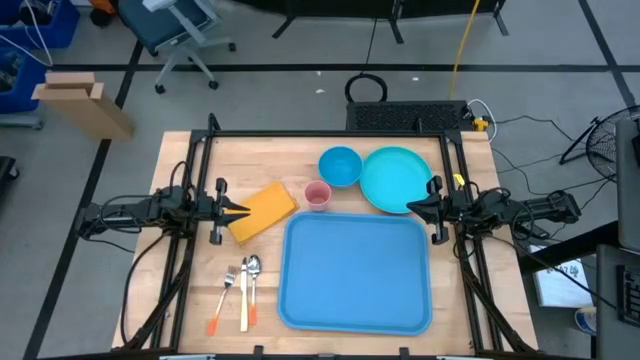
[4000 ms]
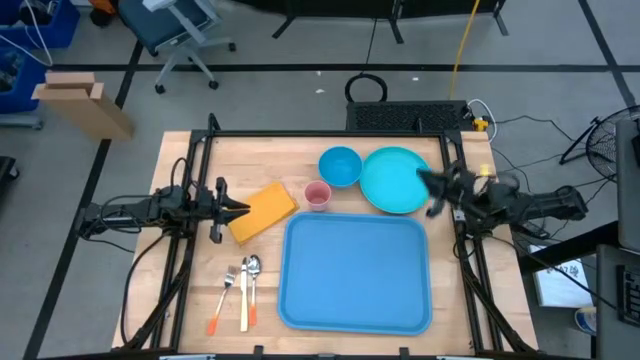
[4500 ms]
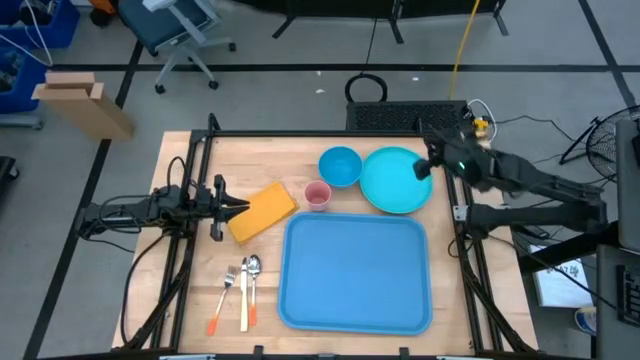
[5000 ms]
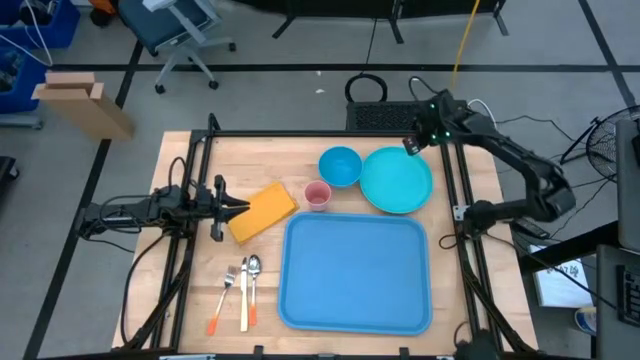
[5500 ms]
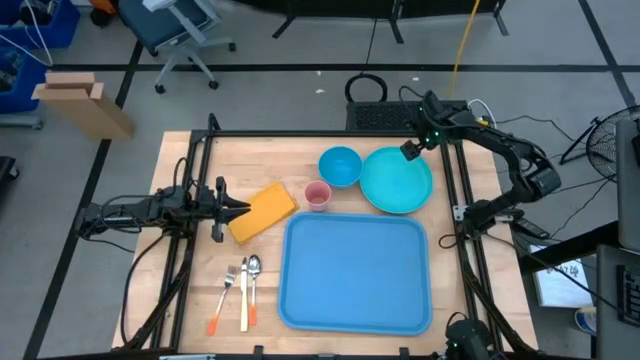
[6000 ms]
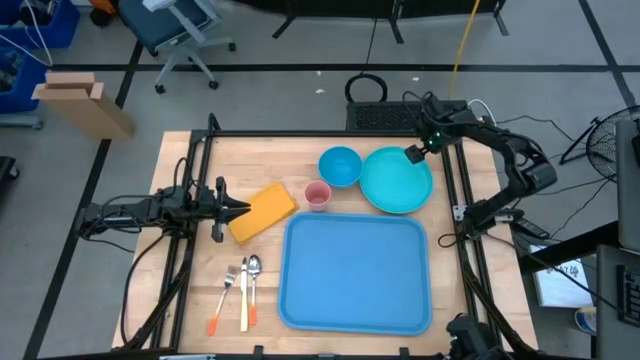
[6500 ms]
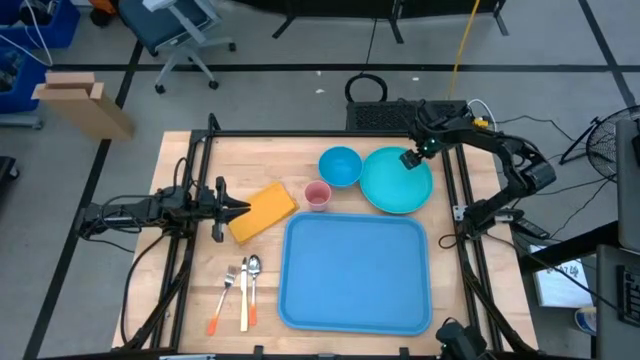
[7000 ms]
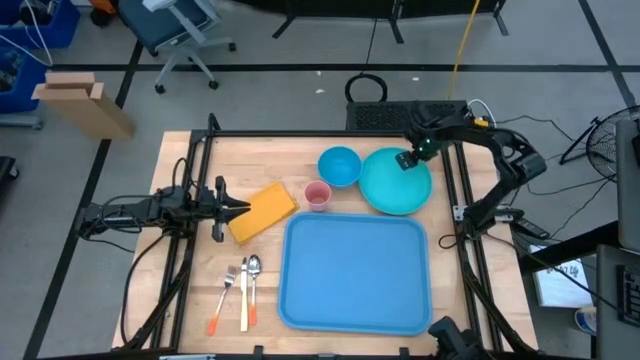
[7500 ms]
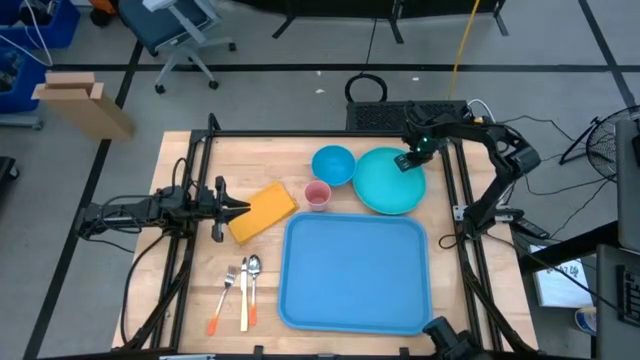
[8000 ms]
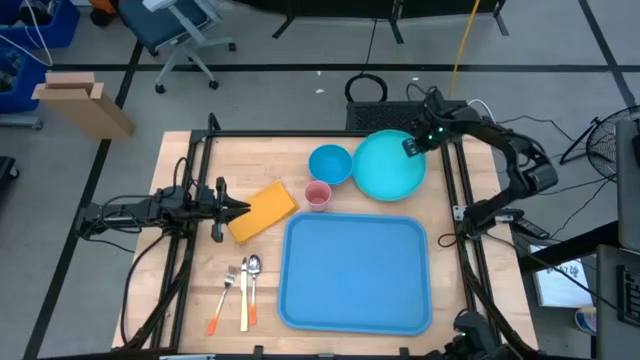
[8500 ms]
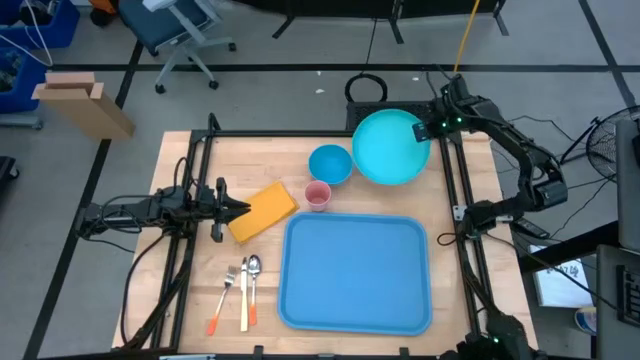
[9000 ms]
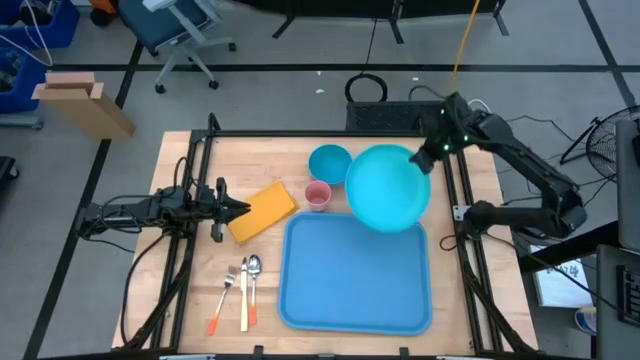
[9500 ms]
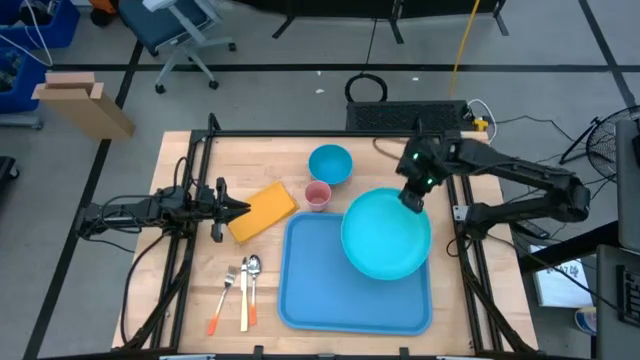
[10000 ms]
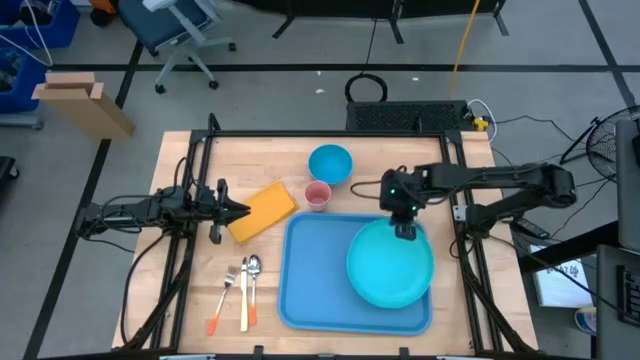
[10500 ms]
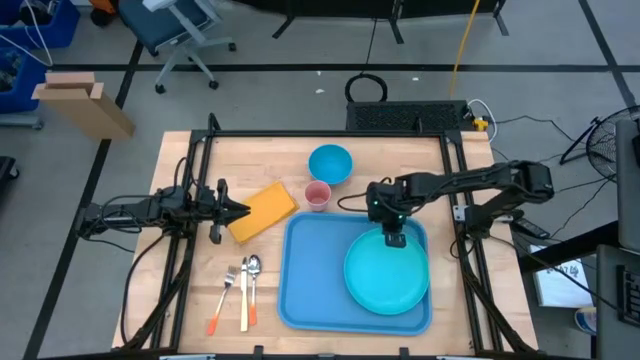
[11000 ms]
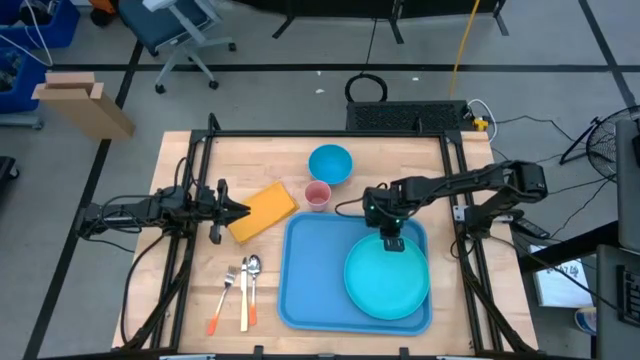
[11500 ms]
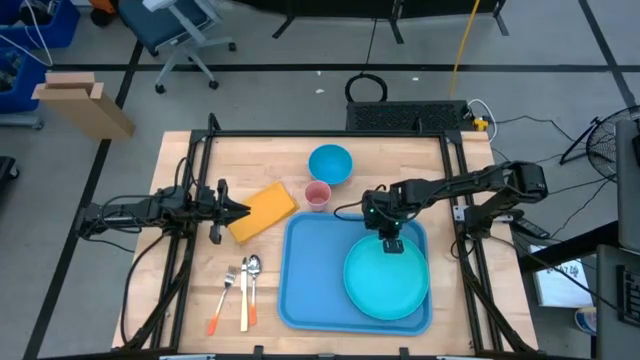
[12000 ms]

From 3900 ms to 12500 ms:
Task: Set up tray
Put the blue plate on right side of the blue serving tray

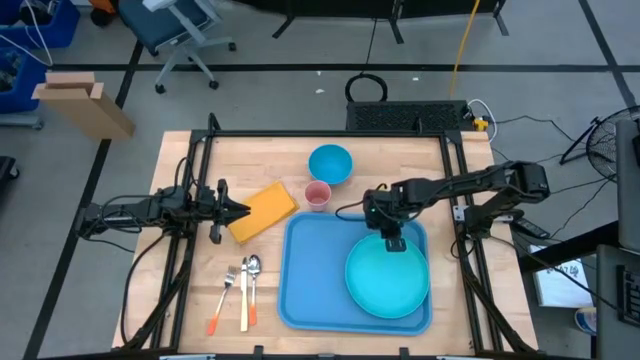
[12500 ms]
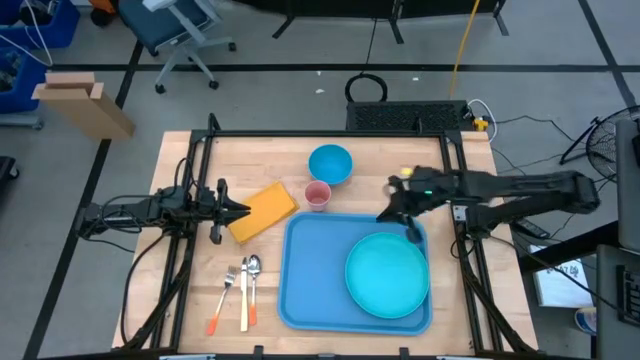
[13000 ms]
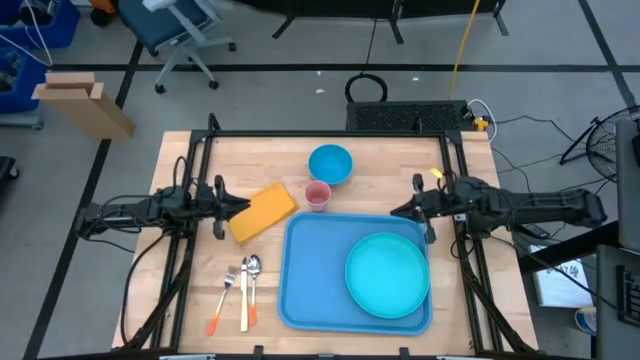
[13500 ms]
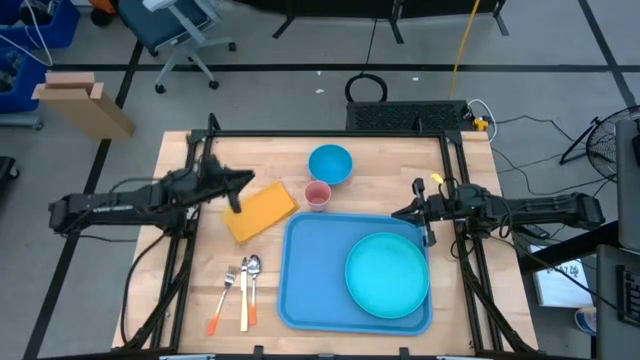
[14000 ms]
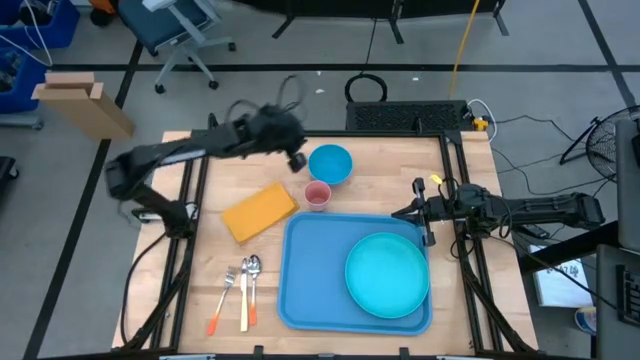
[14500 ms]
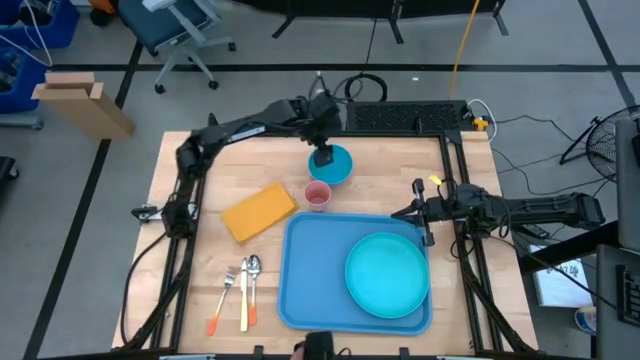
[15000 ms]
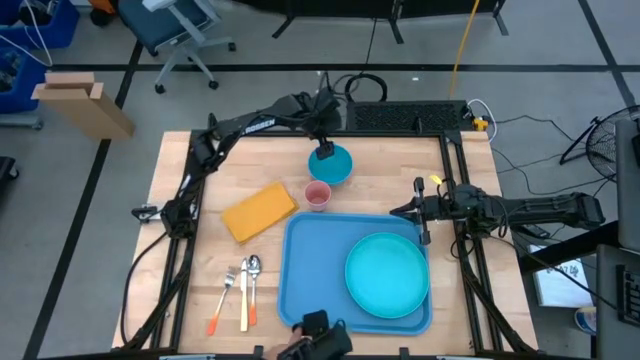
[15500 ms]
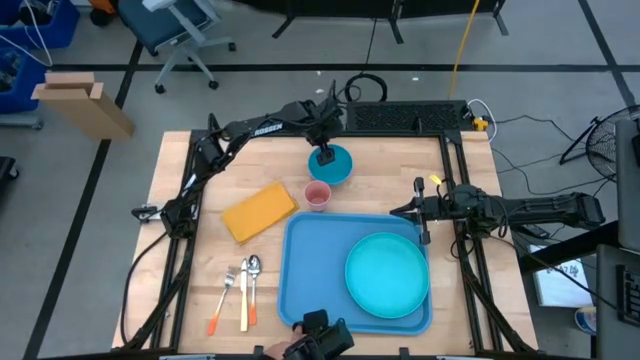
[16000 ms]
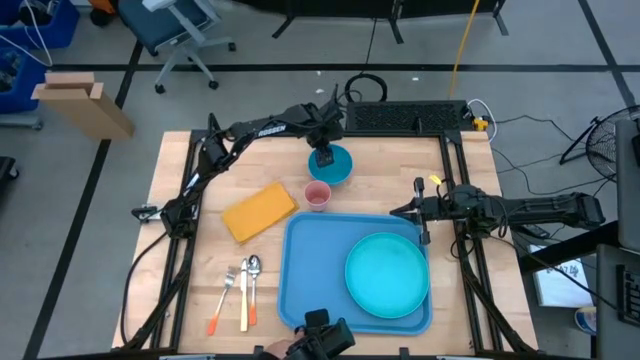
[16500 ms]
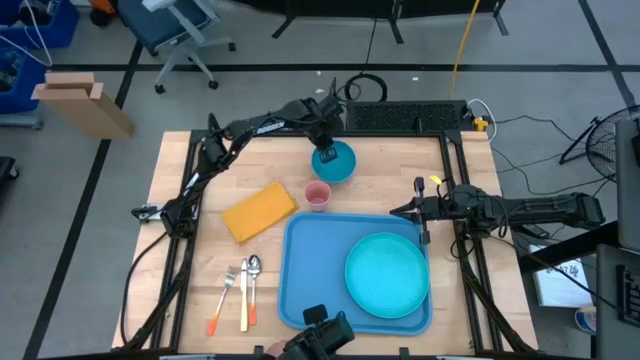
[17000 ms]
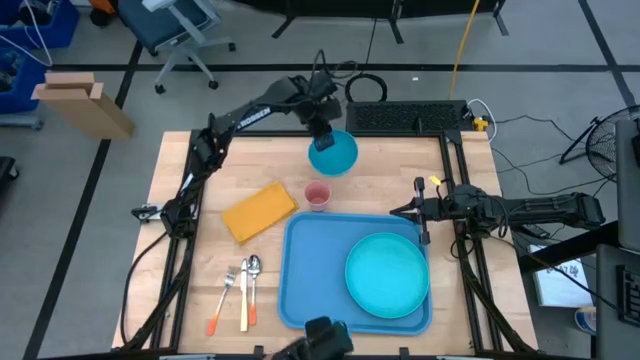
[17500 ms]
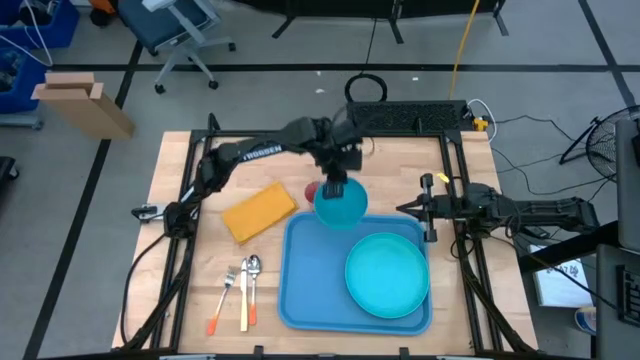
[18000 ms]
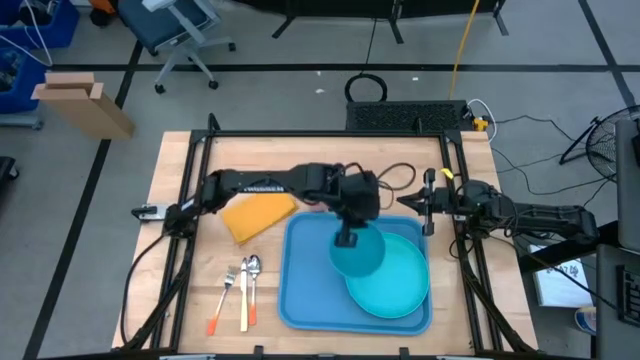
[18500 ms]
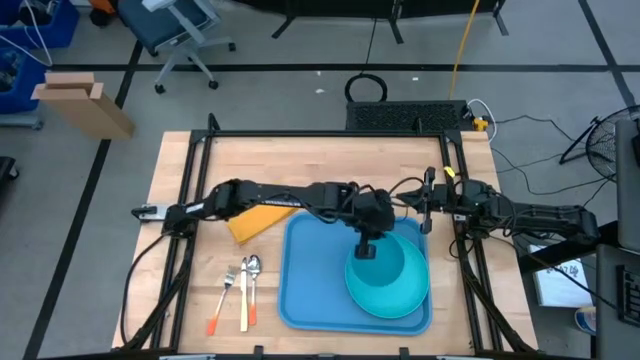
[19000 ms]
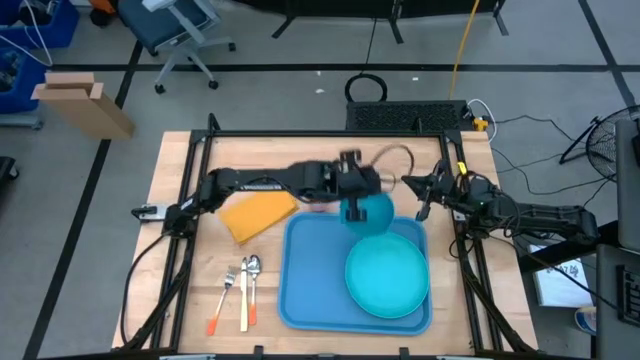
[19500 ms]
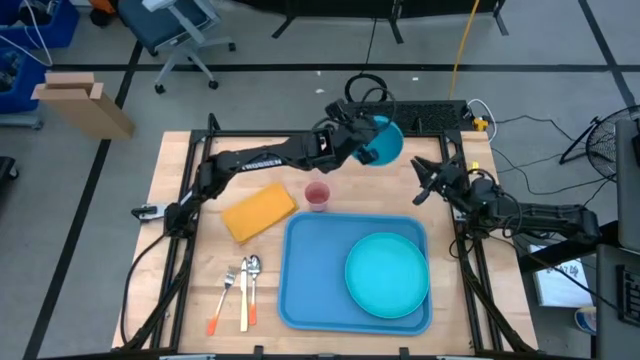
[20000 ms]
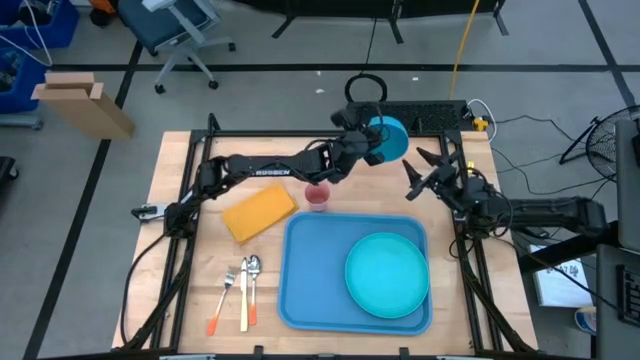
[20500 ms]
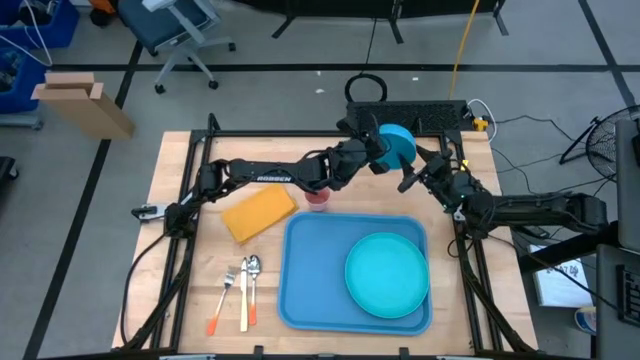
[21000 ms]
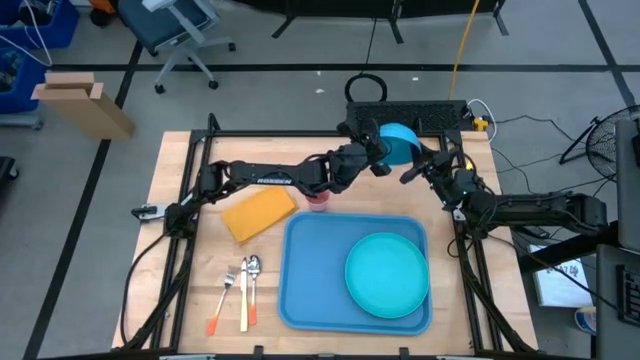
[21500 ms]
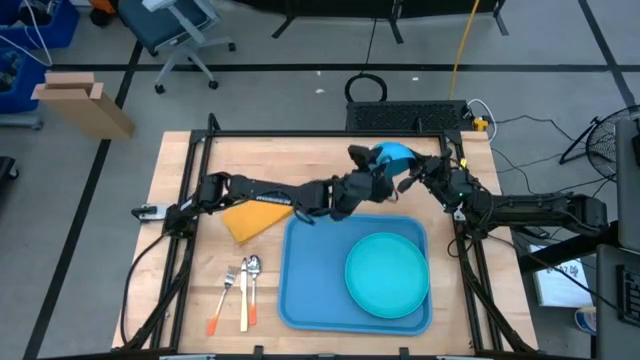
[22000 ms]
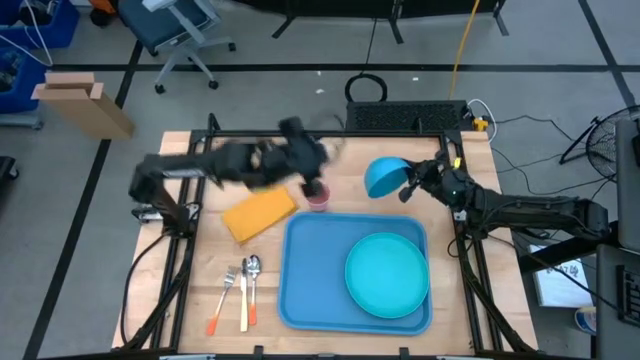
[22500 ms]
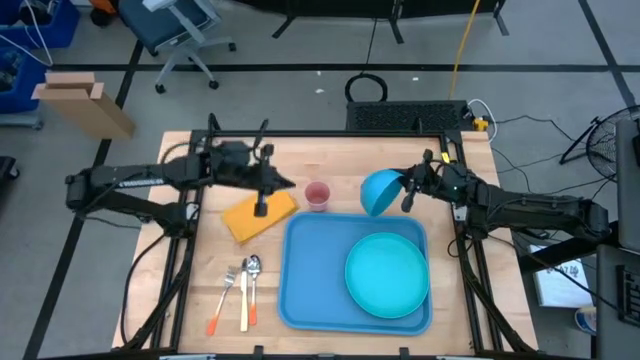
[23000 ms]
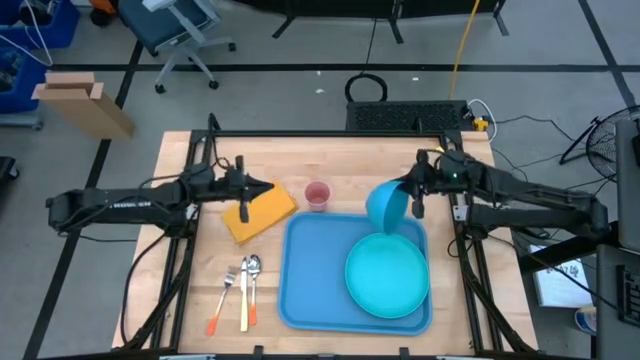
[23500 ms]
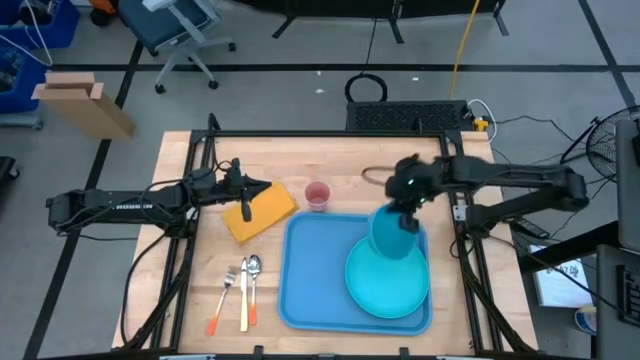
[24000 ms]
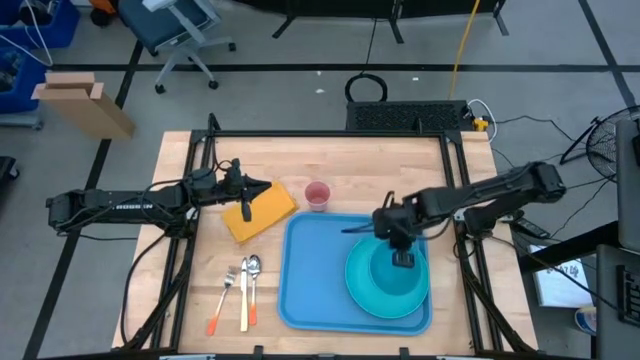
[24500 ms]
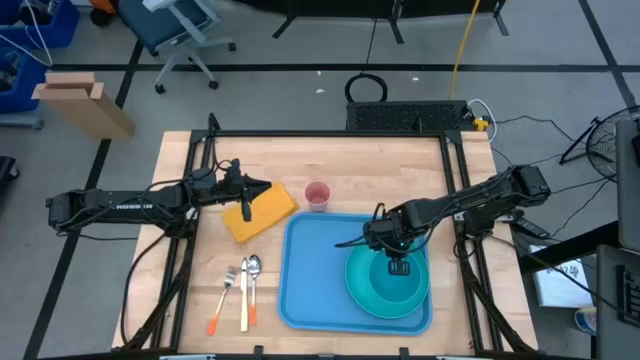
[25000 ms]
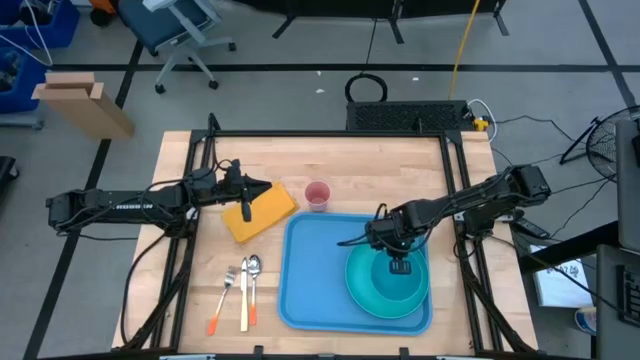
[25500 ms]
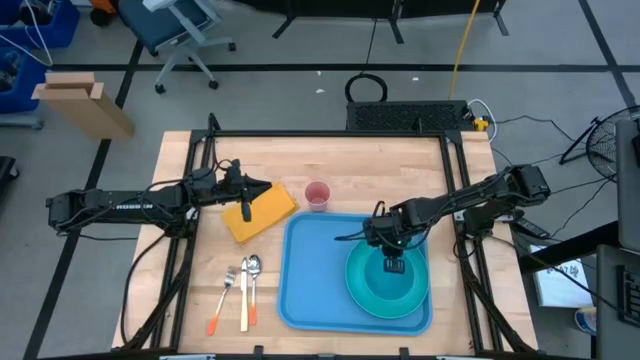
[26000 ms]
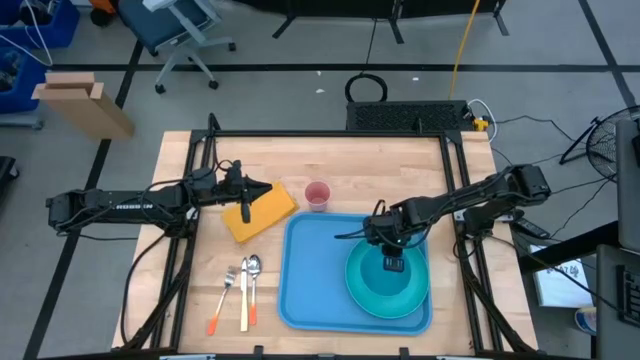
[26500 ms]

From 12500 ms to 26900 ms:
Put the blue bowl on the blue plate
